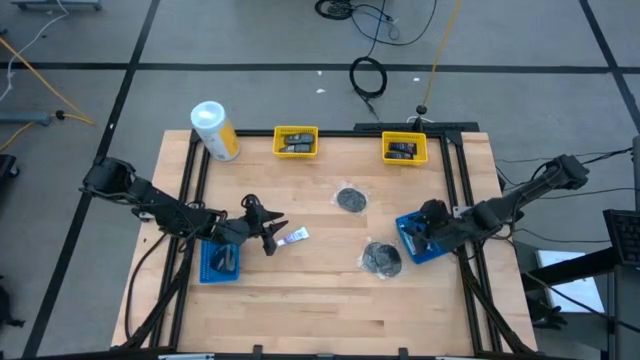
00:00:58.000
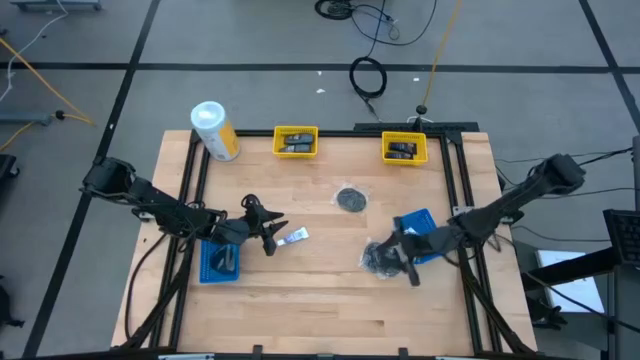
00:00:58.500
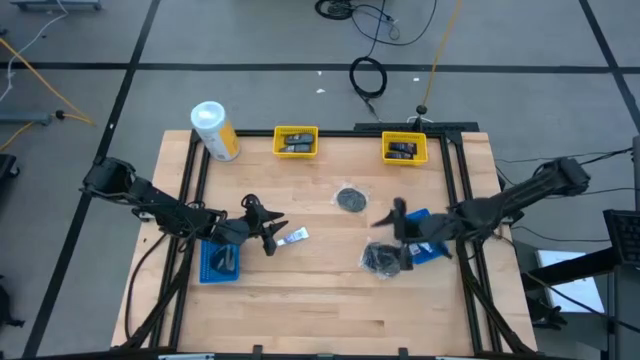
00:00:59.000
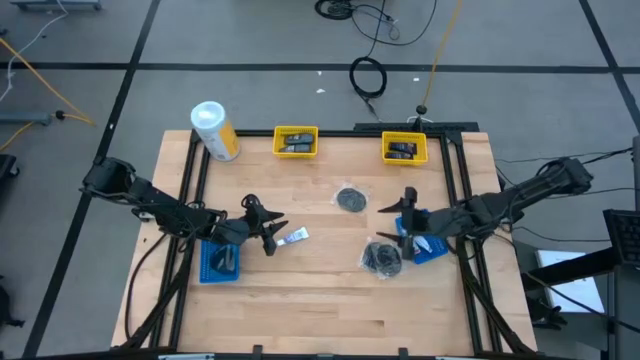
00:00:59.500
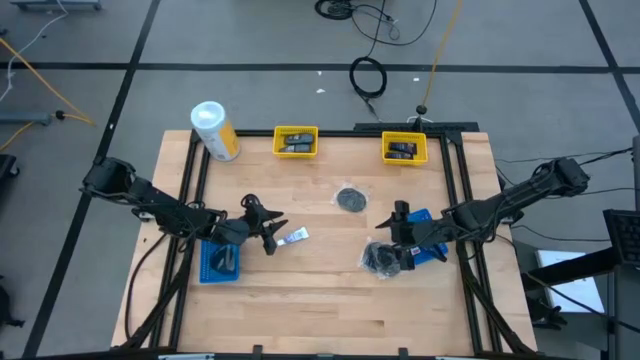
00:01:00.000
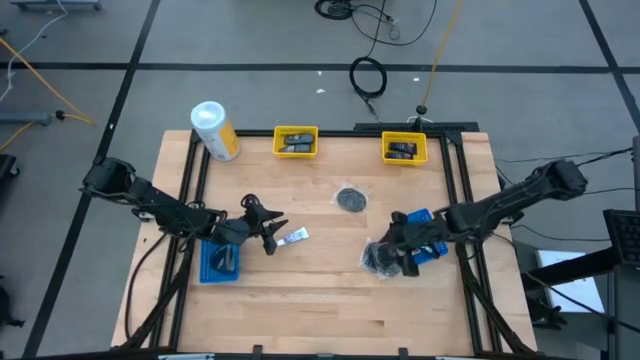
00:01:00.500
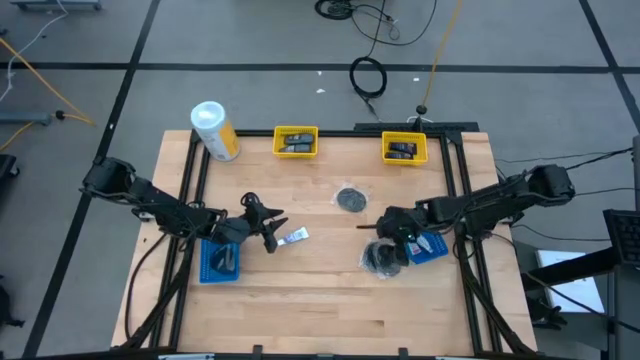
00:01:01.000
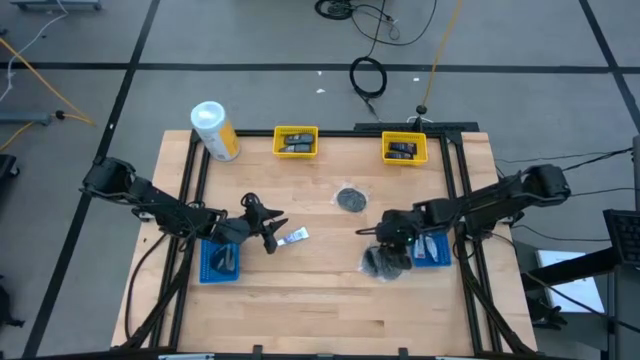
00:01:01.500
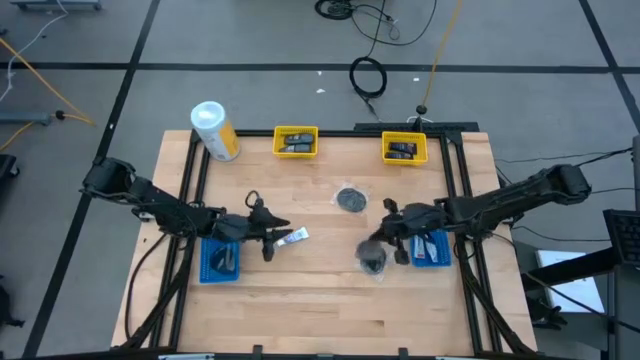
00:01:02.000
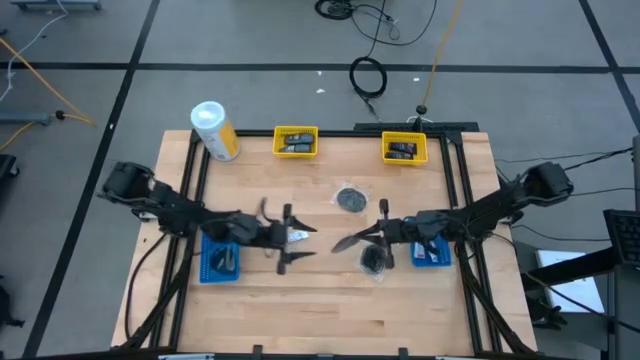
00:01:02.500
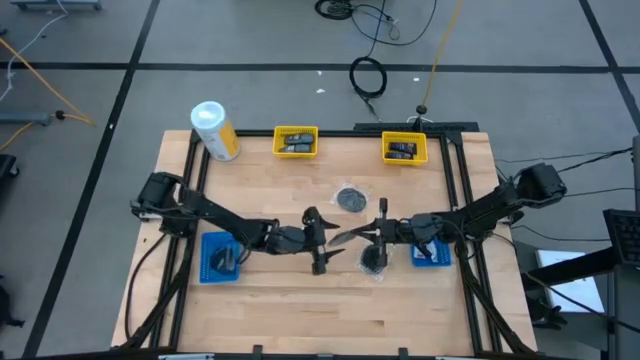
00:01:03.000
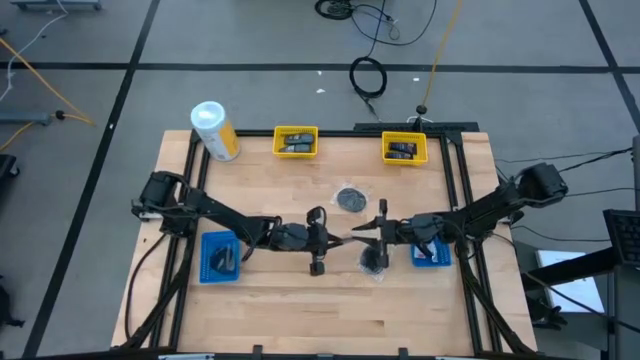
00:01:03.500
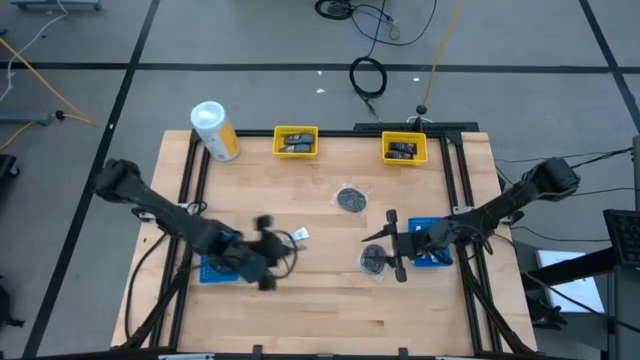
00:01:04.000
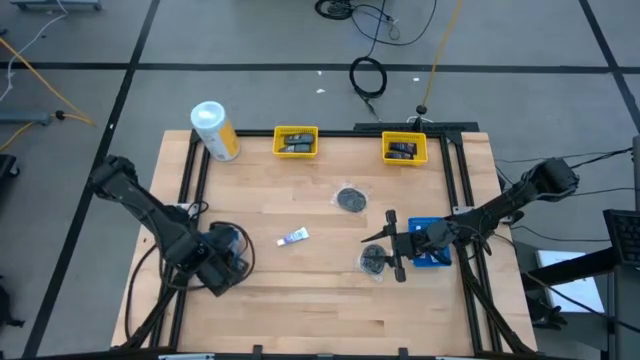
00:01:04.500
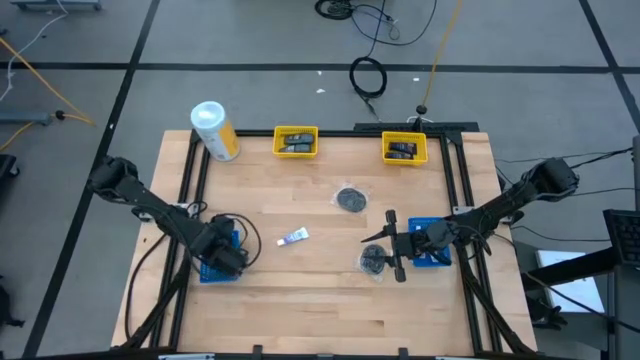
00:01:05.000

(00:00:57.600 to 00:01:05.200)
Task: Pick & Place Travel size toiletries
Put the black hairbrush into the left blue bin

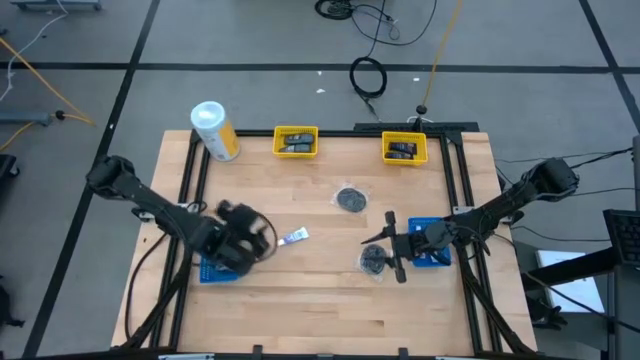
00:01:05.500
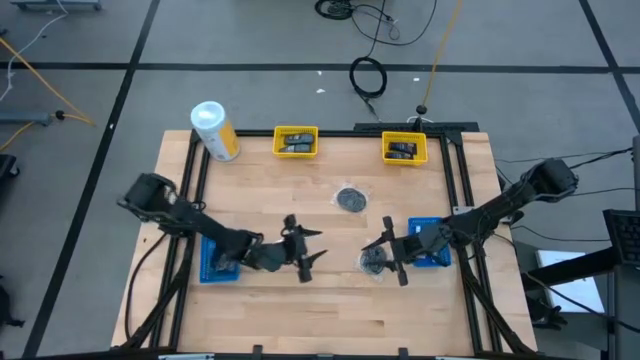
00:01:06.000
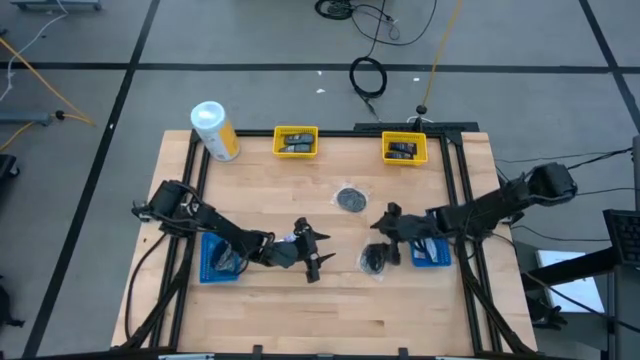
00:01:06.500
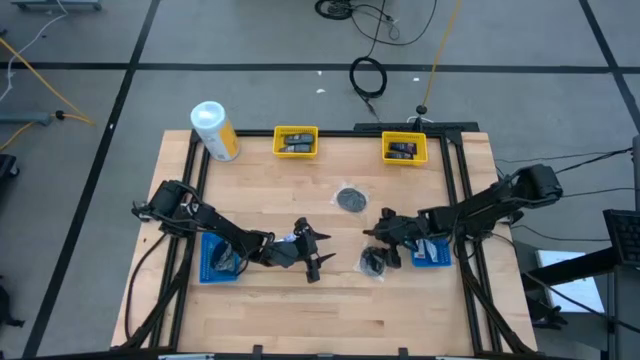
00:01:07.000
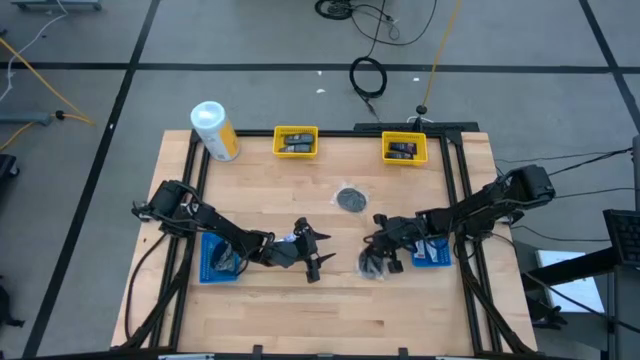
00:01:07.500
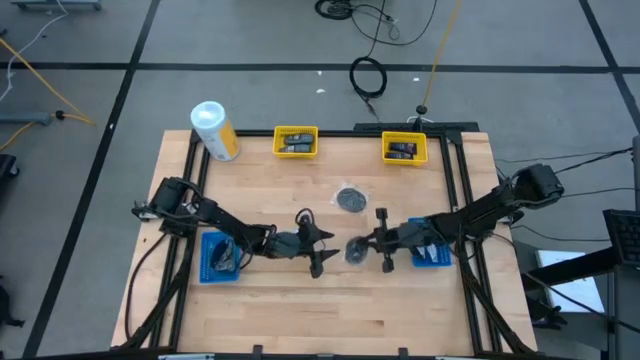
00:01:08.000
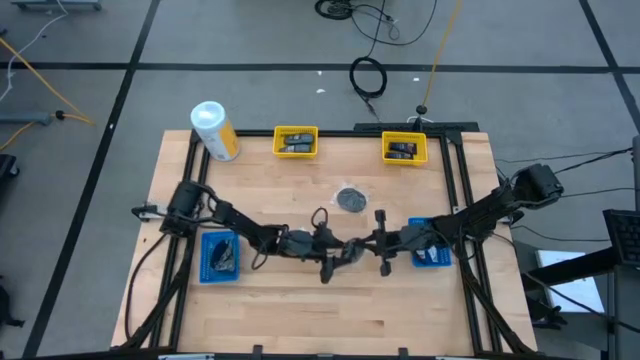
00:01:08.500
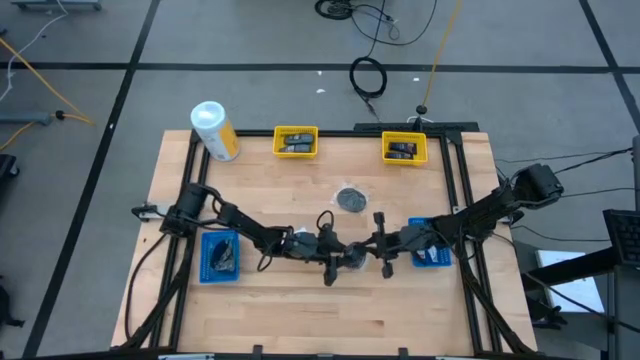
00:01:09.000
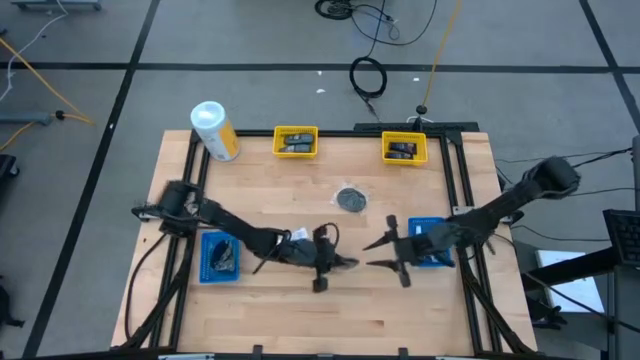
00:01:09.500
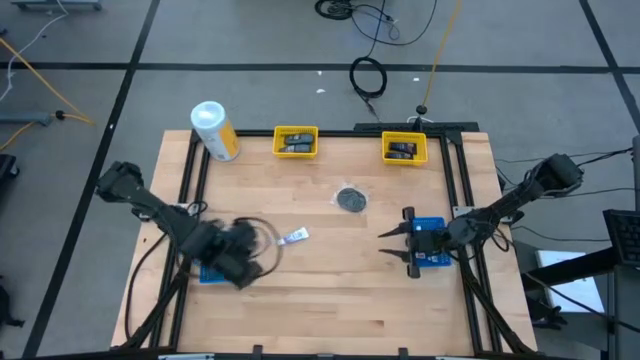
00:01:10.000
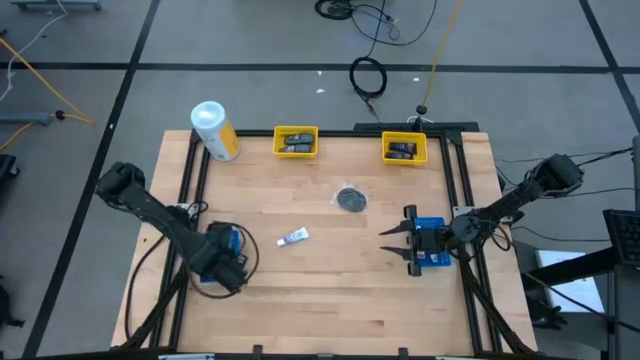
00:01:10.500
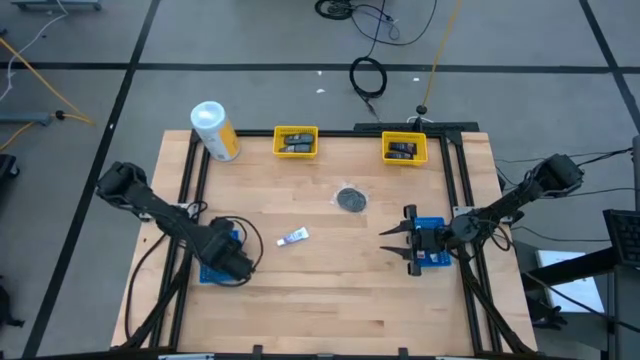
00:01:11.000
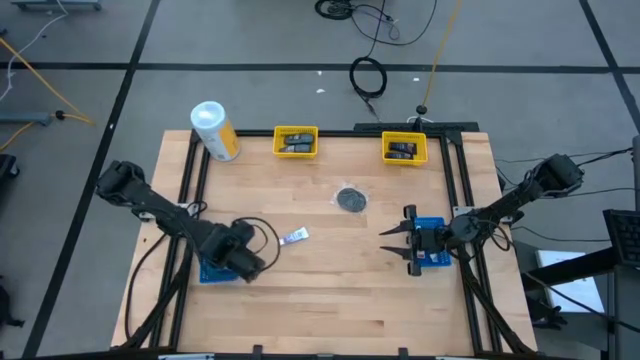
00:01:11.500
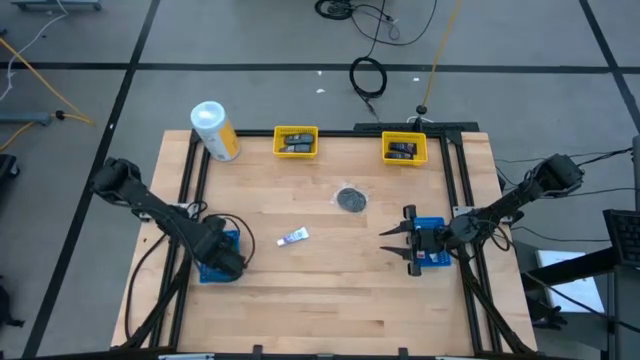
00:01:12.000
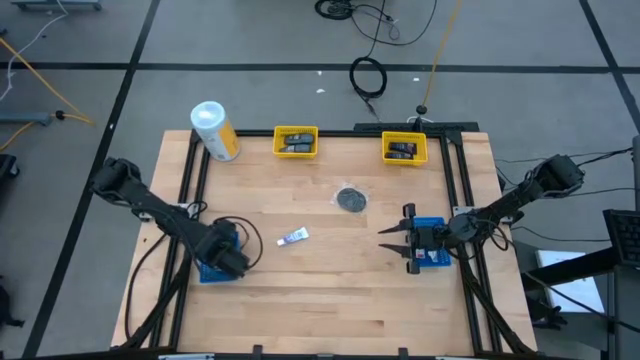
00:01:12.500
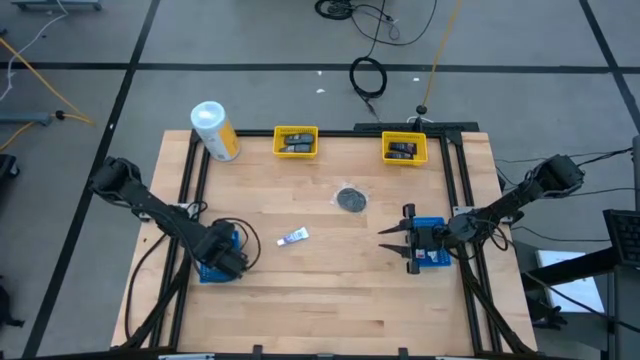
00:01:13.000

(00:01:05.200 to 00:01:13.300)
Put the black hairbrush into the left blue bin

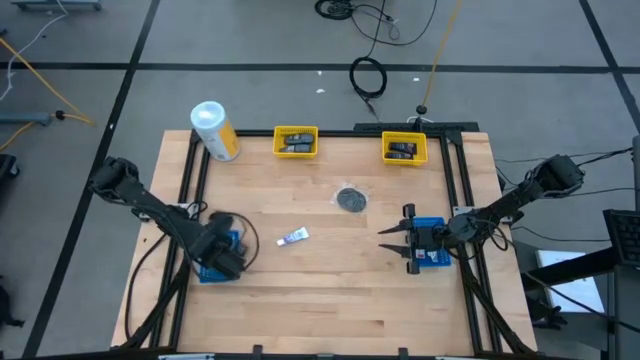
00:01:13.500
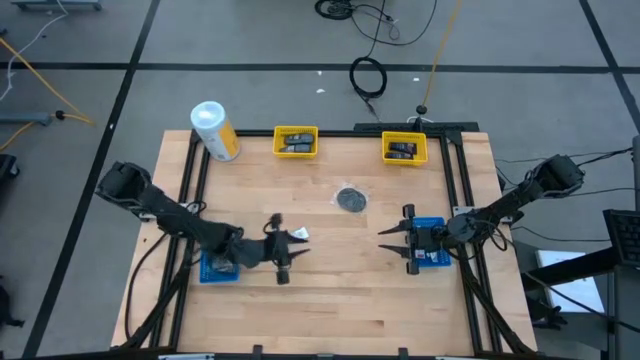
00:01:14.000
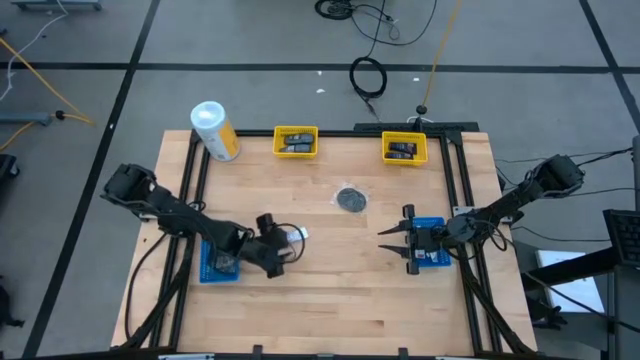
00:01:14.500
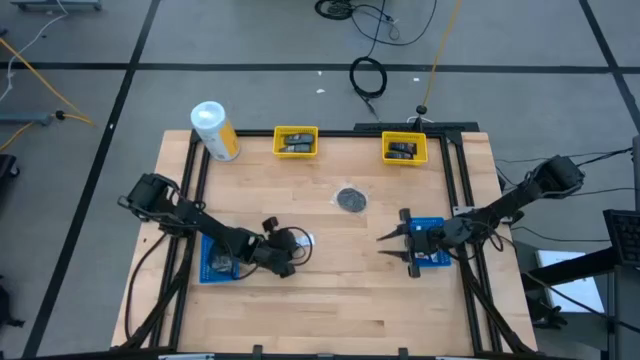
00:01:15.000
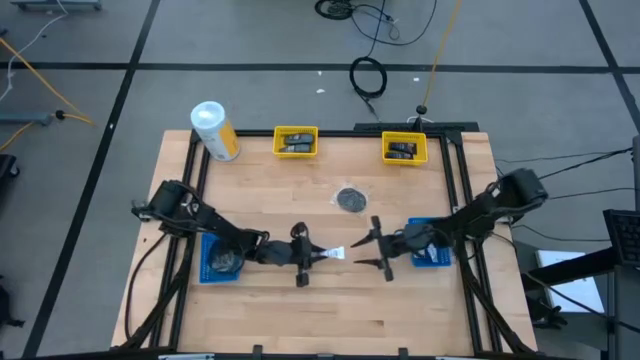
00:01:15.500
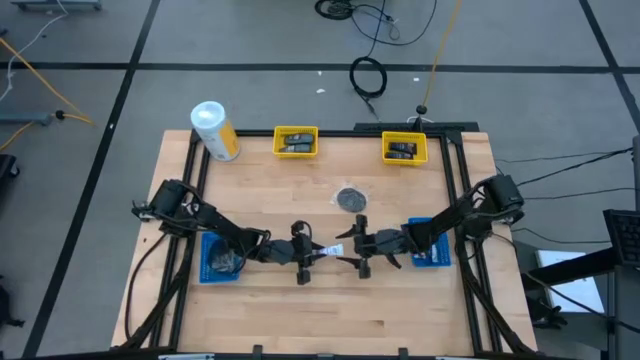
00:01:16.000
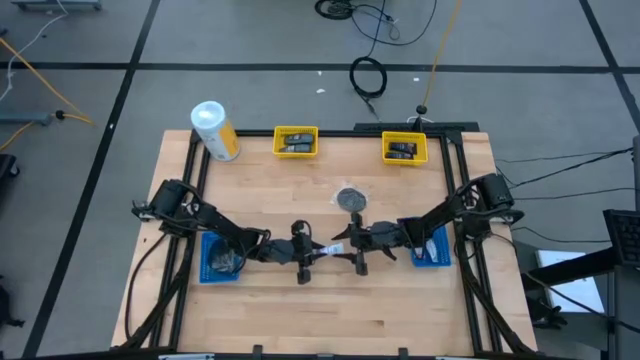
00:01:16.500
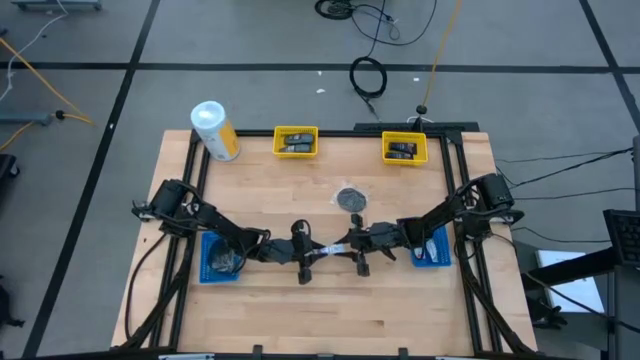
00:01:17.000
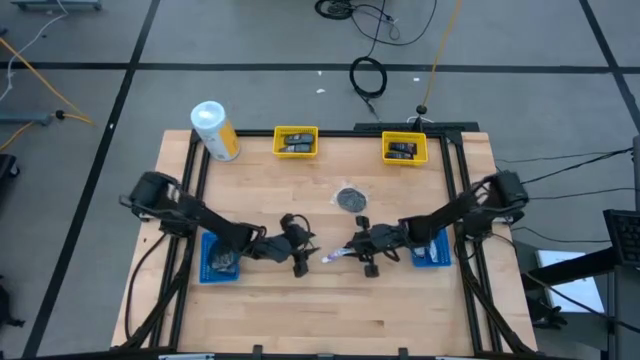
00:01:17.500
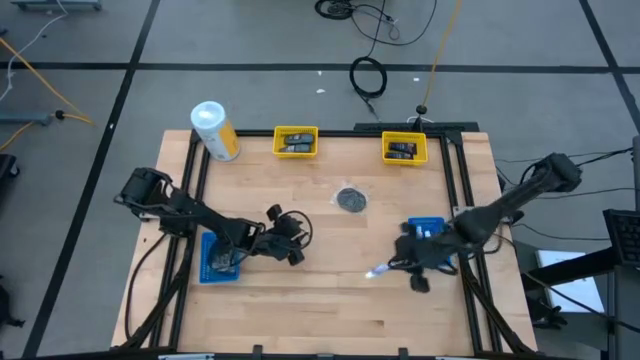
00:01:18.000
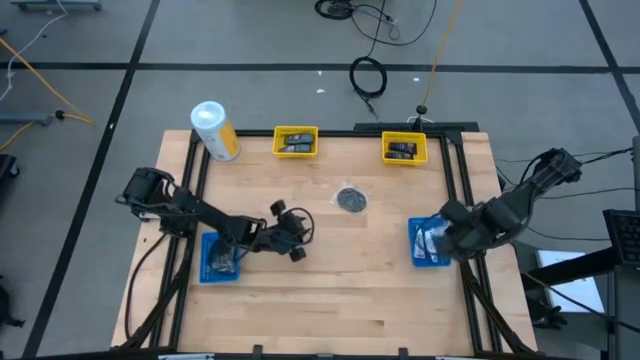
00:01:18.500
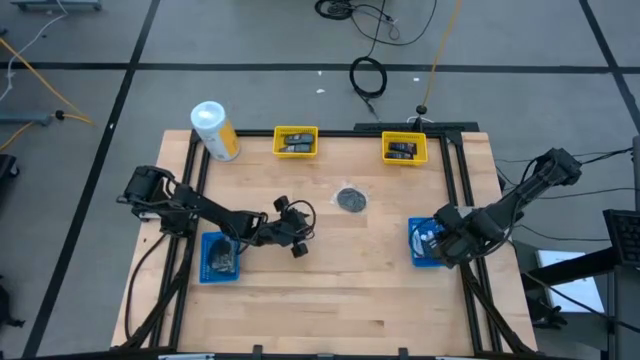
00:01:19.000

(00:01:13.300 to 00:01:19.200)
Put the white toothpaste into the right blue bin

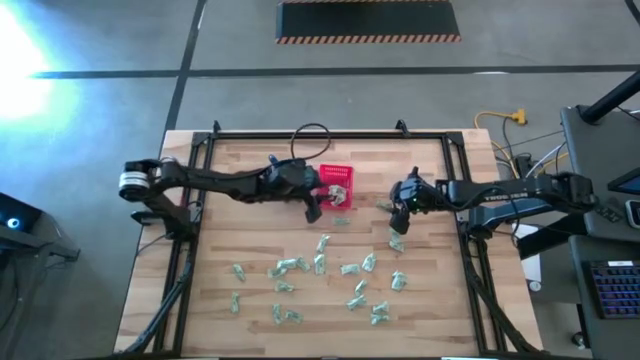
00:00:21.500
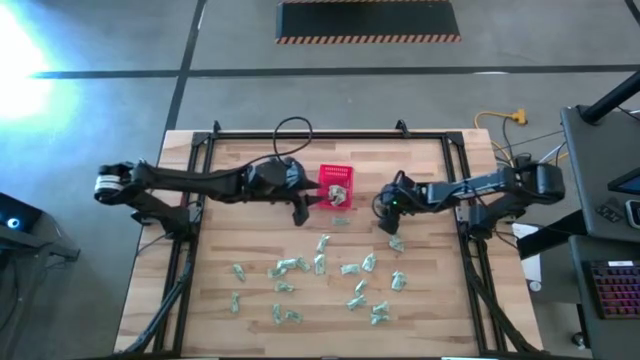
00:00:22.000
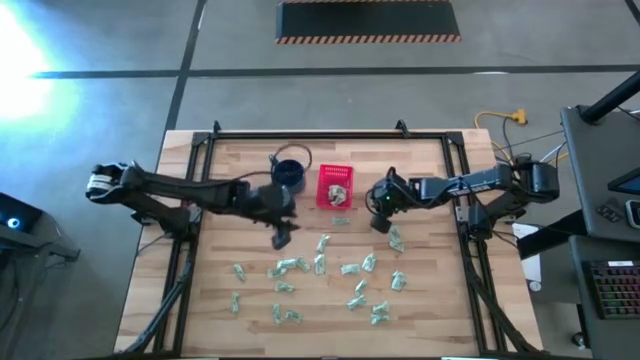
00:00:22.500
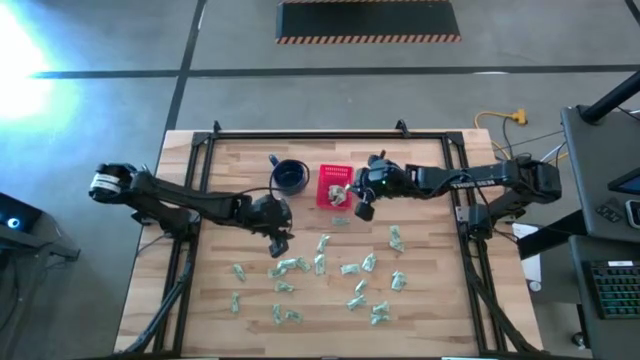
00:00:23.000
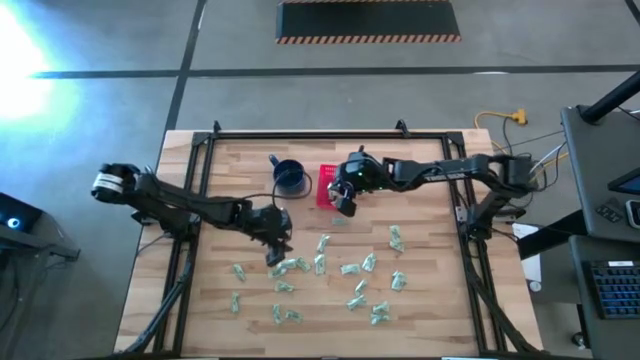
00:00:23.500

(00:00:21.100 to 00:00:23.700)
Task: Pick and place Stevia / Truvia into bins
Put the stevia packet into the basket
